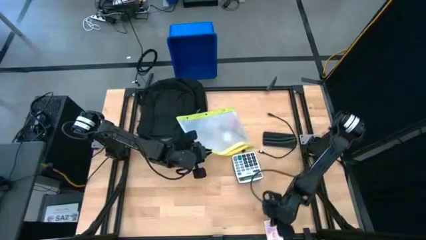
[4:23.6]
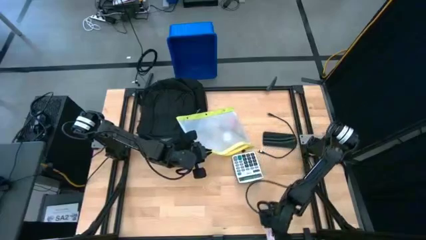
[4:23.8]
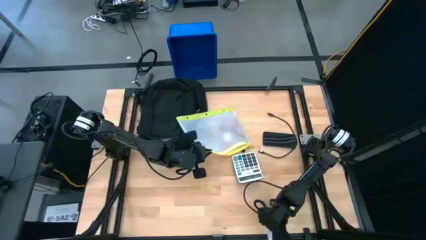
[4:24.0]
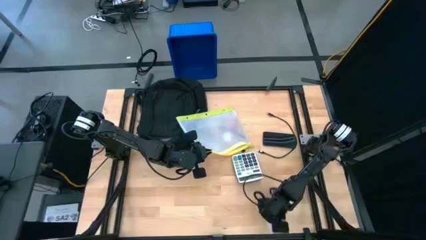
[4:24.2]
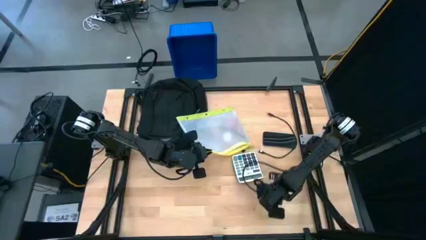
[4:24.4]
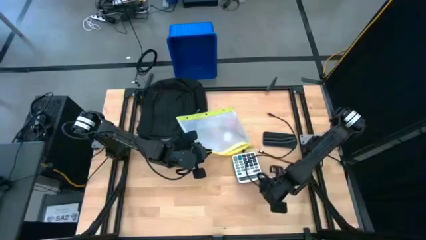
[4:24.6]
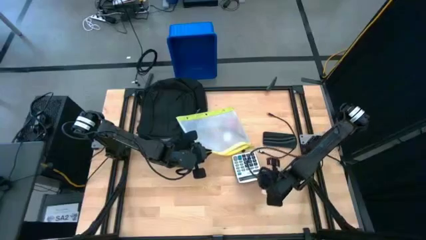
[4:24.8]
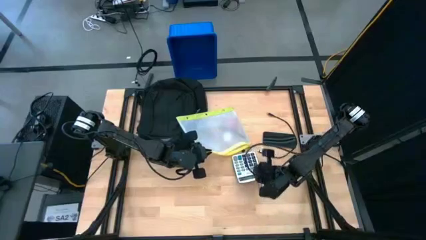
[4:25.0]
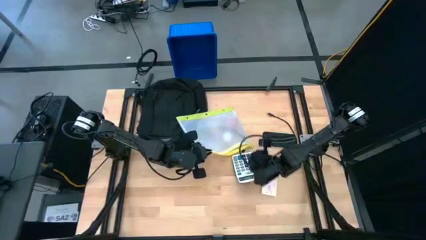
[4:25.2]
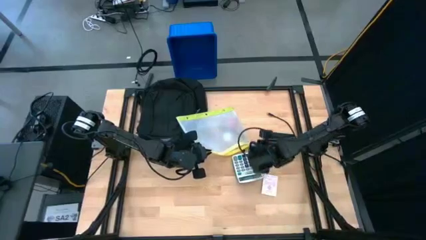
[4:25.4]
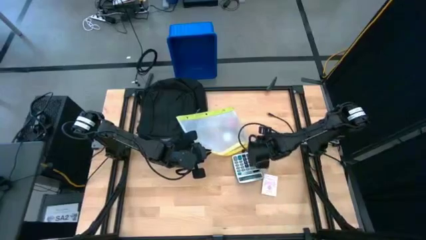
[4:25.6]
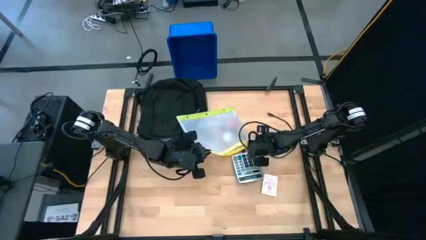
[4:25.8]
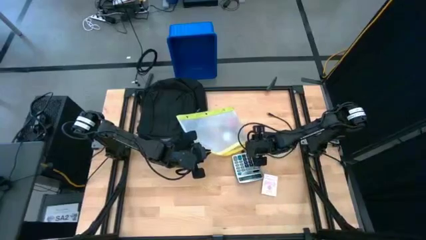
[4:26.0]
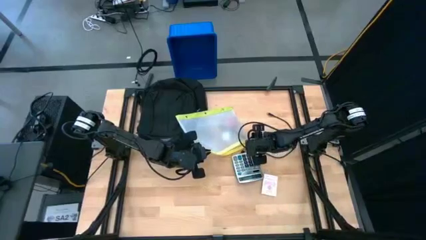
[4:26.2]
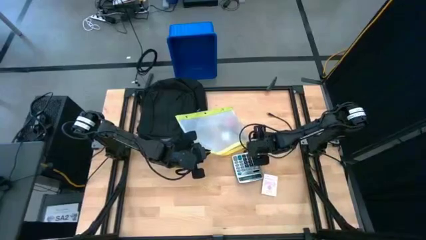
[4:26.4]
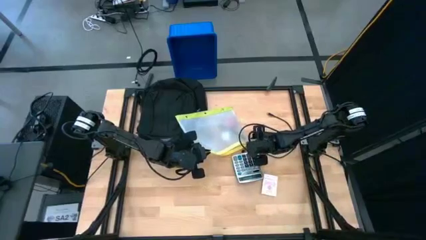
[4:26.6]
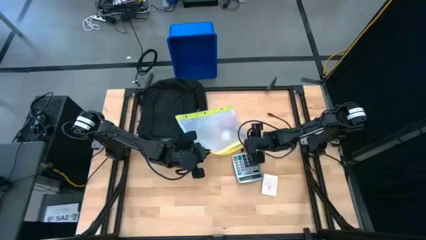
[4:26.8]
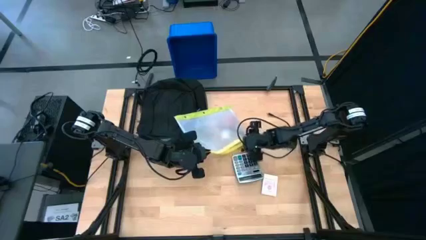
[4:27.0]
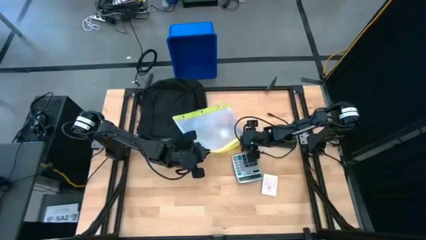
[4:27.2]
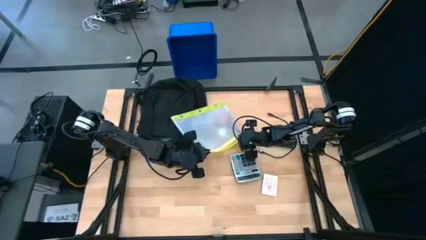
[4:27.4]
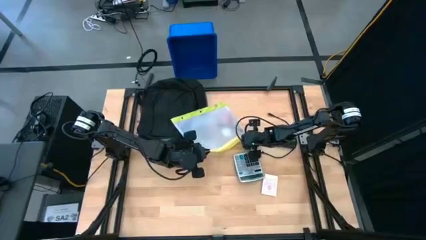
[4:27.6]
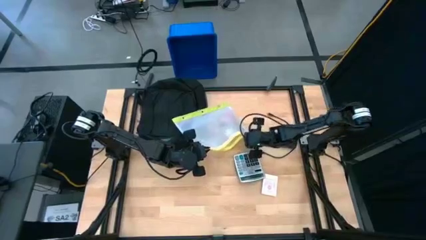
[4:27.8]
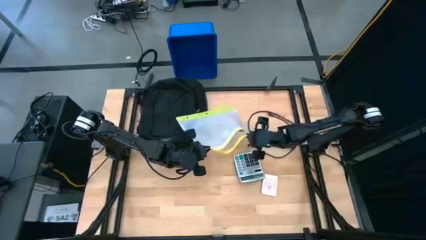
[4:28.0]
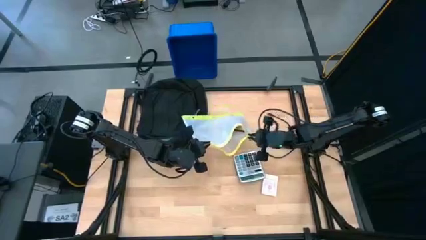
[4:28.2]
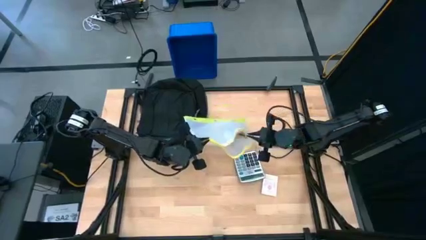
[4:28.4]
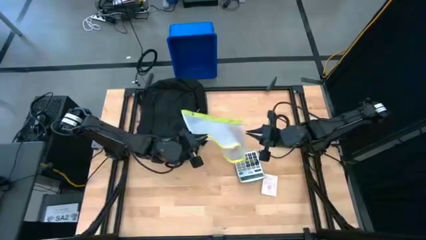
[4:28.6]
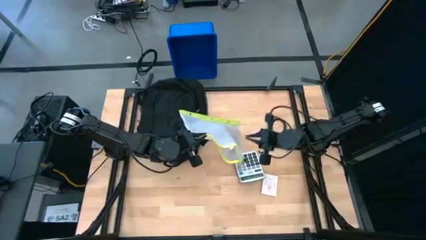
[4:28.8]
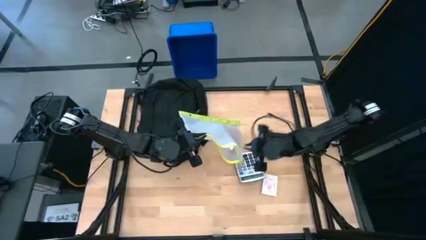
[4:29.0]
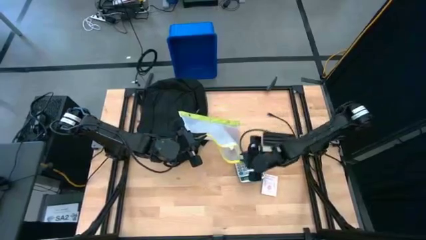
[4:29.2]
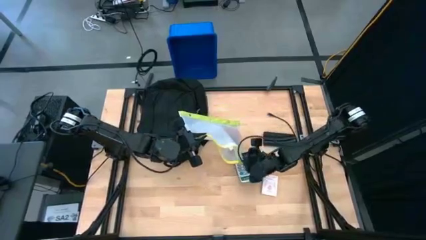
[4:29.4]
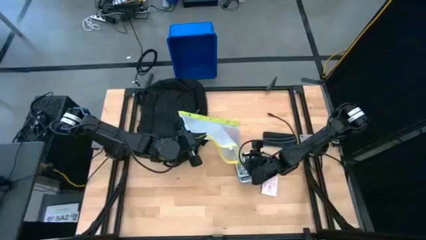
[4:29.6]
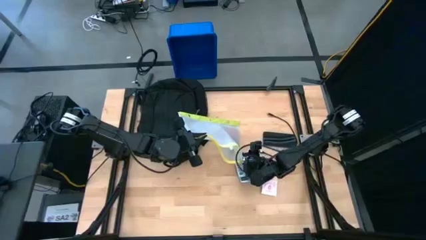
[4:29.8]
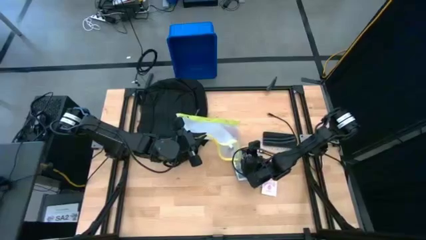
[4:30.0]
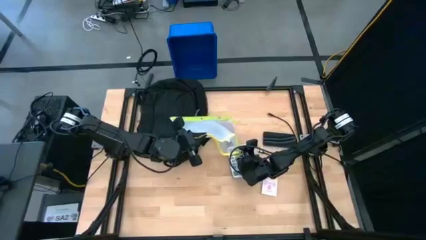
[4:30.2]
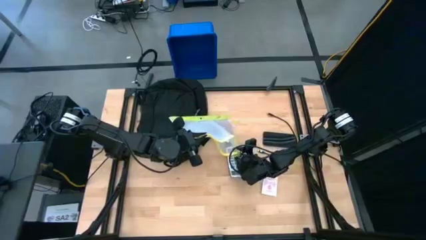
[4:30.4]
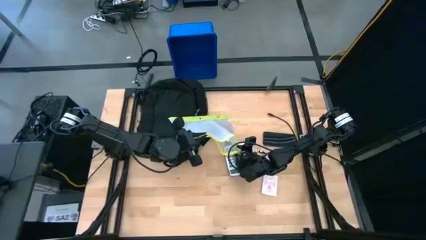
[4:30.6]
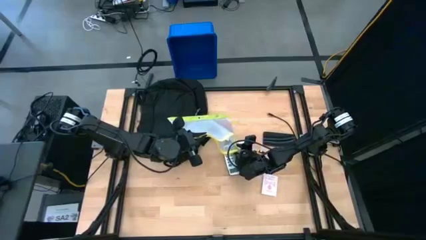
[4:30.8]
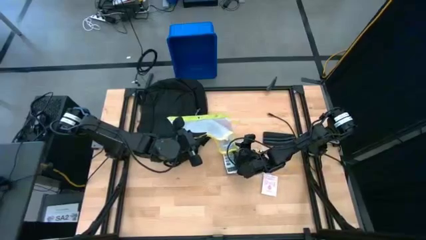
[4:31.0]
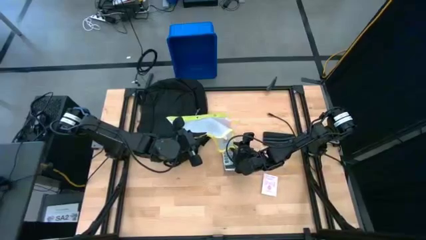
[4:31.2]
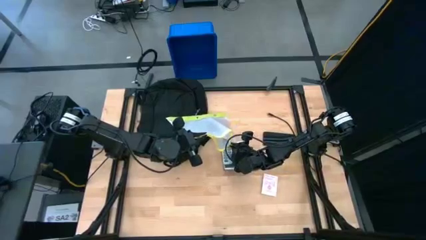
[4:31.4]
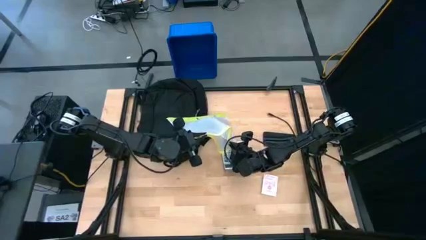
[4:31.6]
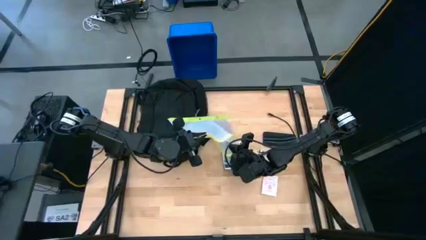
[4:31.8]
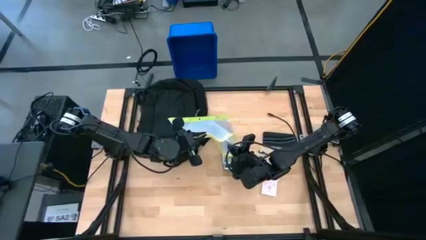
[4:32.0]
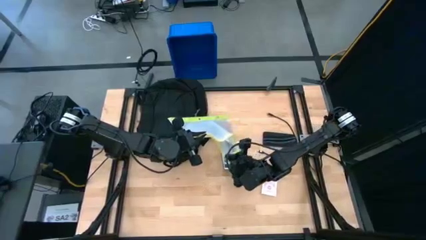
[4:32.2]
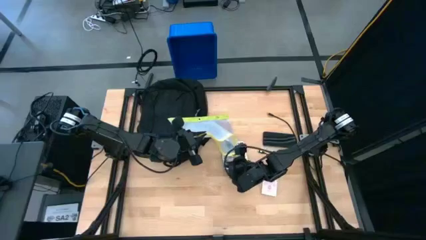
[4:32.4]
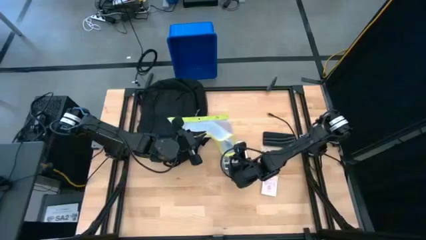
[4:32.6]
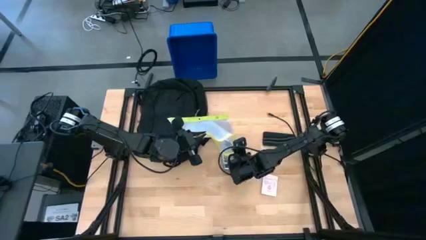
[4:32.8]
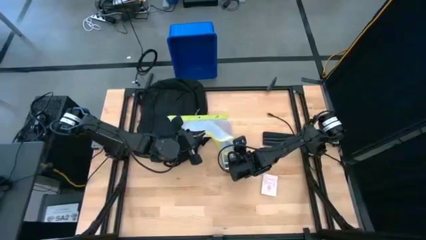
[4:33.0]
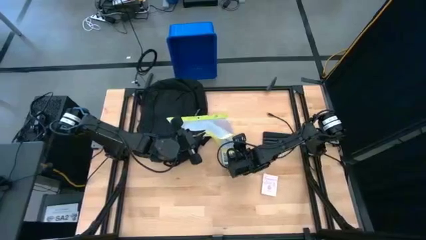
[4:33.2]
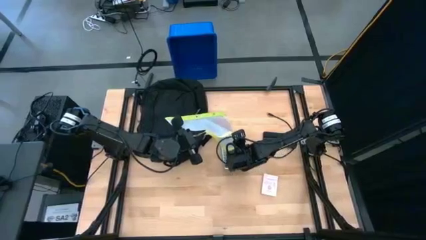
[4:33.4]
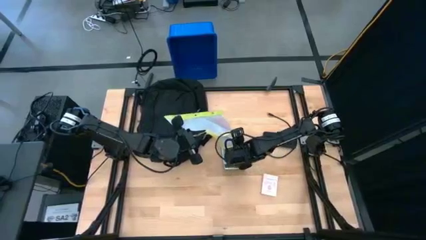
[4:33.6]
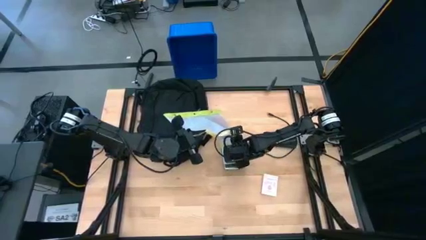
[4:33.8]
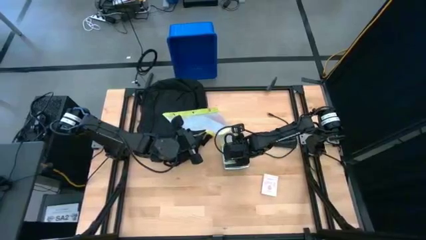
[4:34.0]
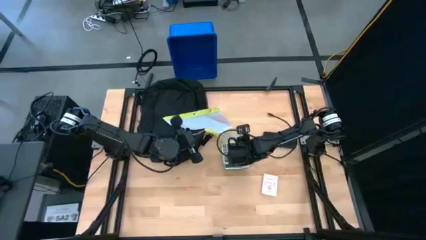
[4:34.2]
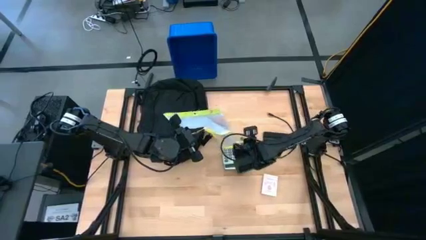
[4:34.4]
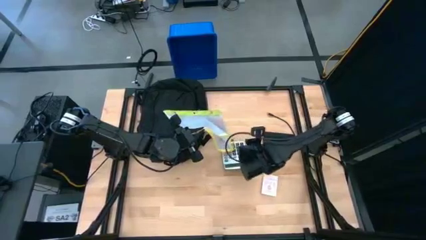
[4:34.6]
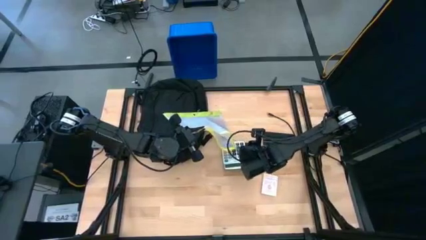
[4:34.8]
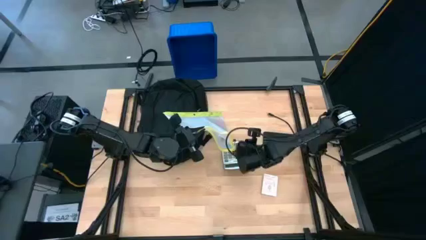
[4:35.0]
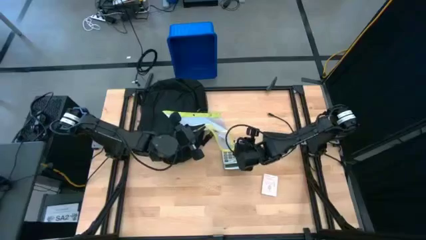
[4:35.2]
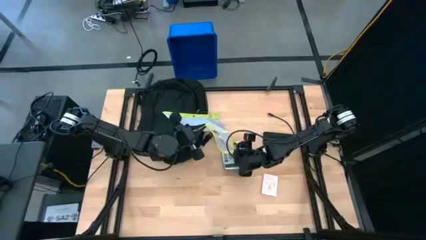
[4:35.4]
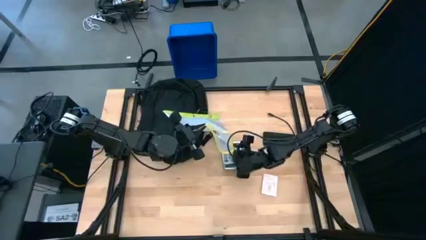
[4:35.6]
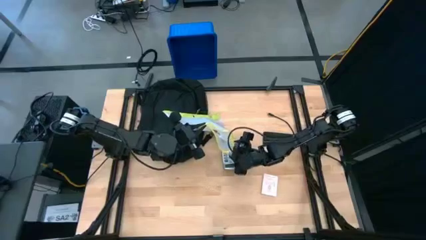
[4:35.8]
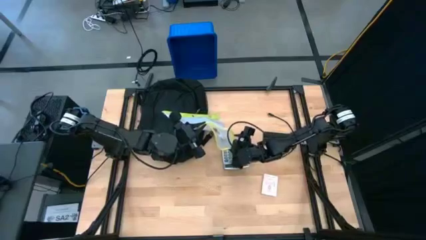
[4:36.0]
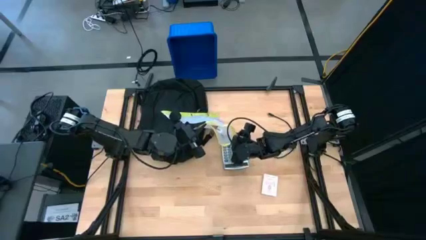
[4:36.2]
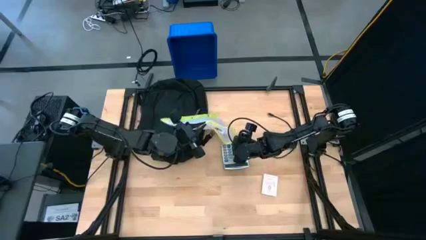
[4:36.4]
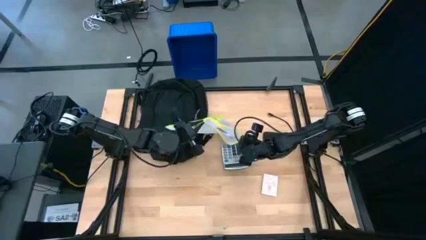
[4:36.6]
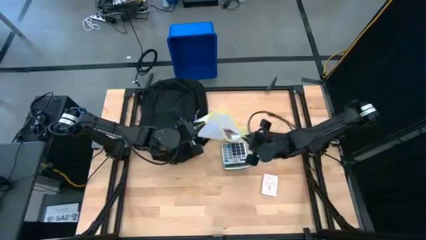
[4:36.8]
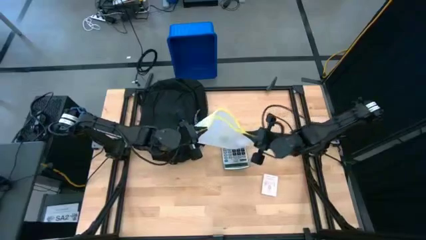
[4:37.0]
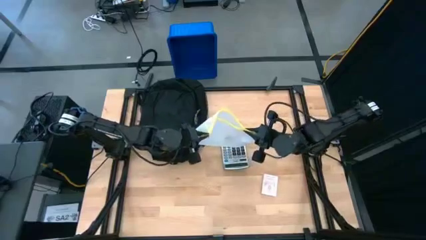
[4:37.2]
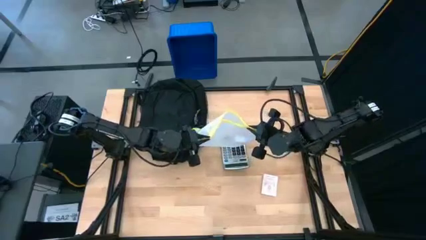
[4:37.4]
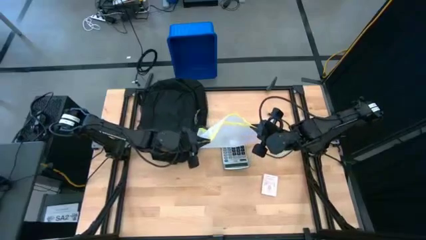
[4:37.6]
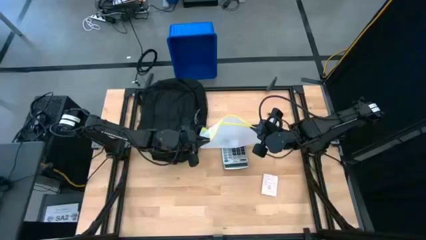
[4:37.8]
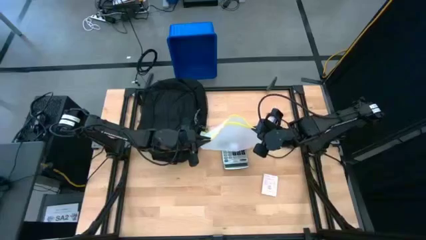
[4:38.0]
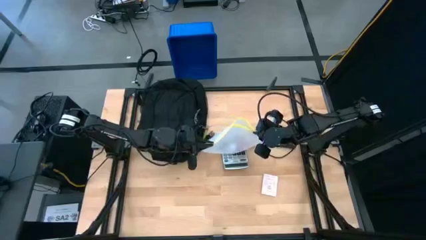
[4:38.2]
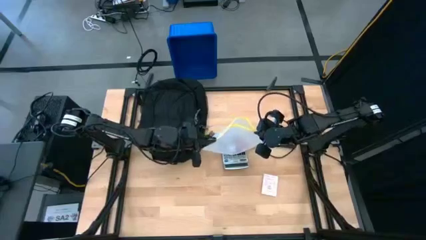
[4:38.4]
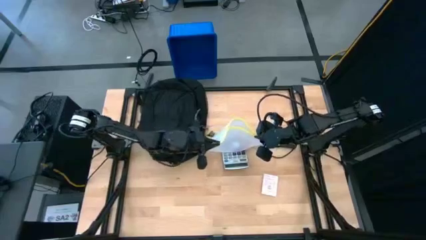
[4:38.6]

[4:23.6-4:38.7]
Task: Unpack backpack
Close the zip lock bag

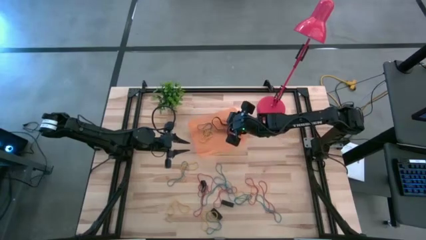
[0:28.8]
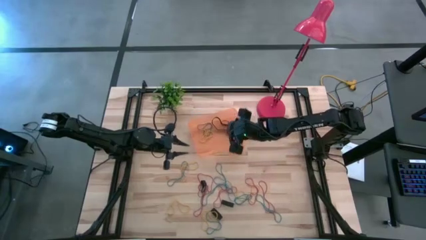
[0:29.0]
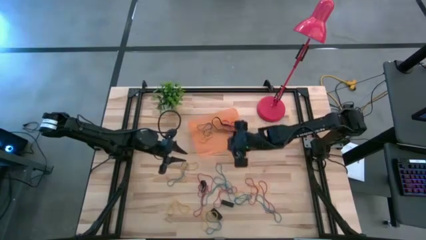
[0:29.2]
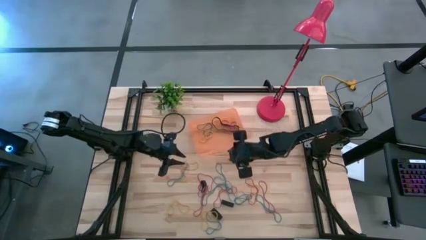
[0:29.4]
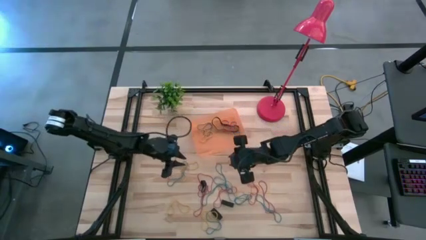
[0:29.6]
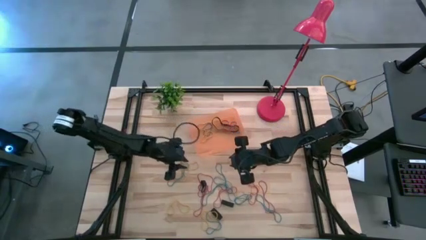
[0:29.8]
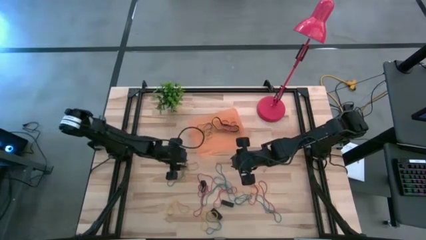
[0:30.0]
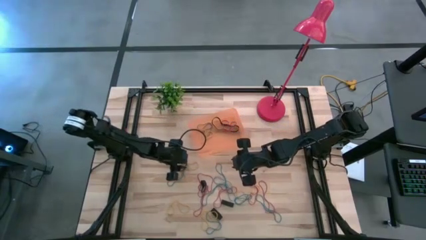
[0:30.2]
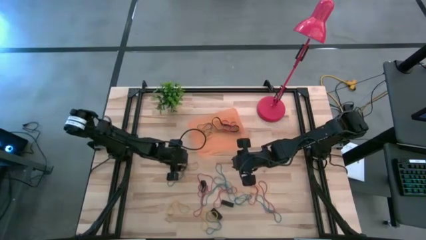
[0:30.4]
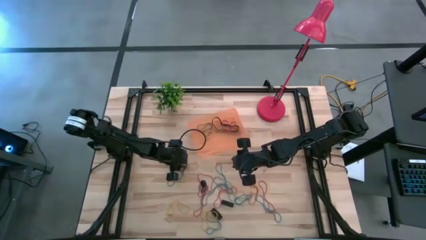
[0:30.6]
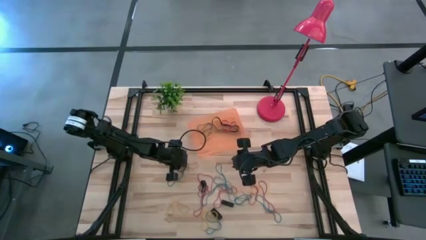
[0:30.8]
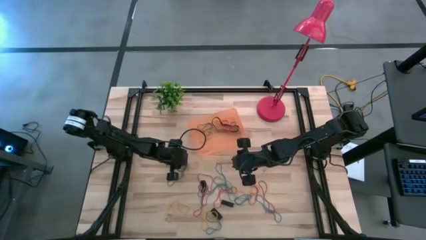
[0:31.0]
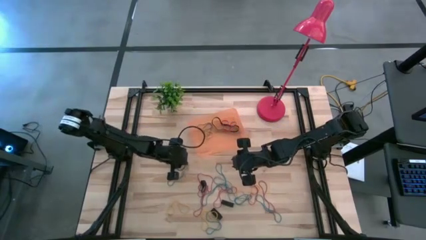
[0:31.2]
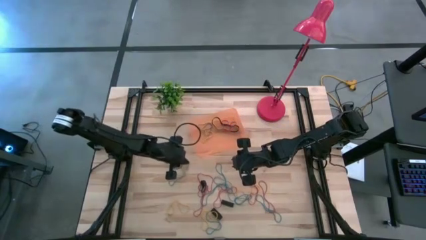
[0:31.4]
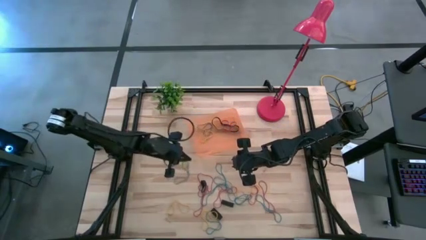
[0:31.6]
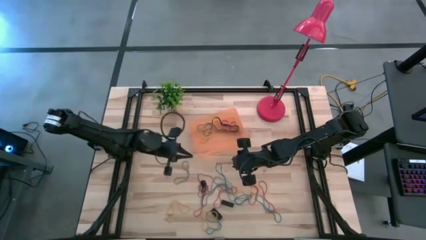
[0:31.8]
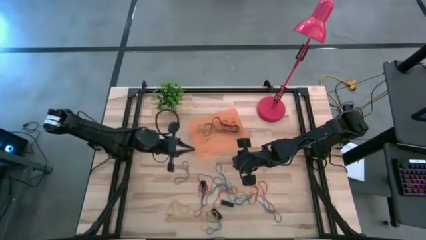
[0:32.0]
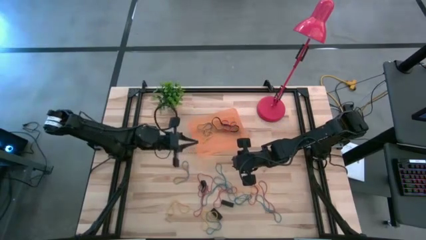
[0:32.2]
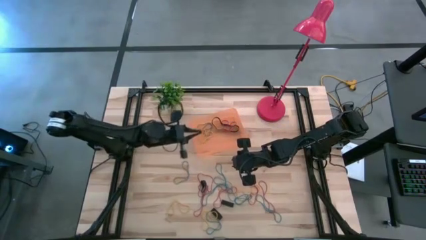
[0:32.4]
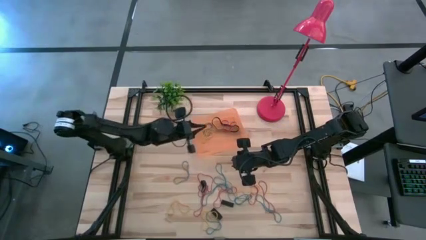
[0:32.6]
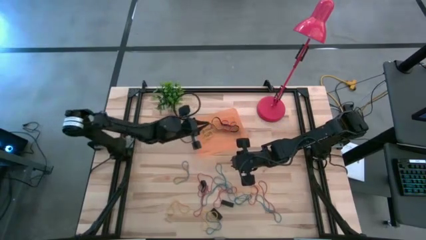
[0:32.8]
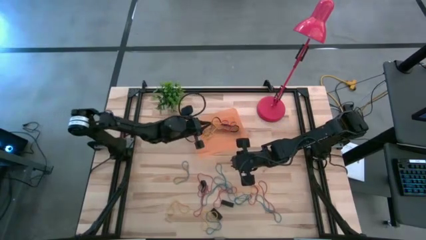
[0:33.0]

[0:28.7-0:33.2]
Task: Pick and place rubber bands into bin
Put the yellow rubber band into the orange bin
